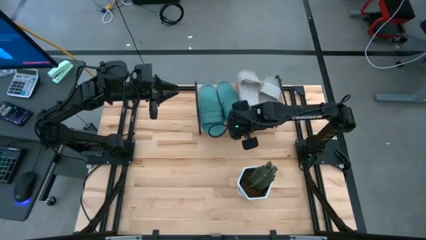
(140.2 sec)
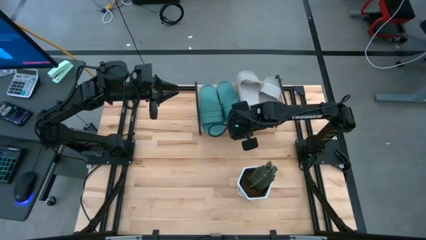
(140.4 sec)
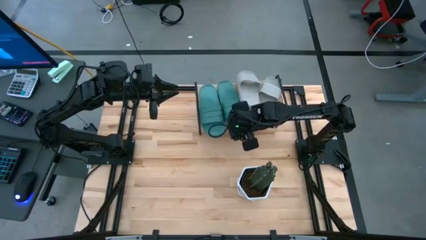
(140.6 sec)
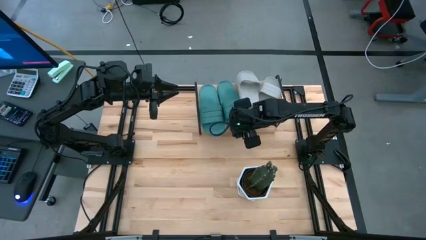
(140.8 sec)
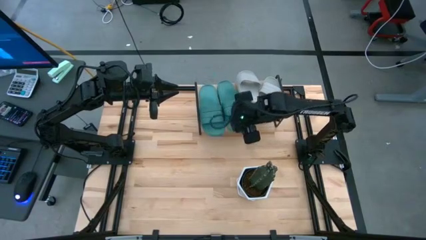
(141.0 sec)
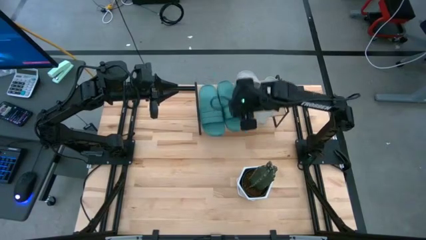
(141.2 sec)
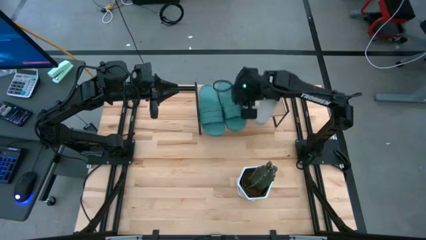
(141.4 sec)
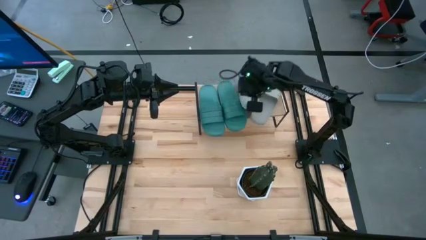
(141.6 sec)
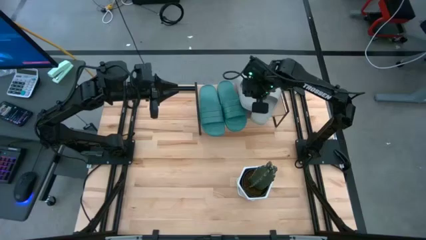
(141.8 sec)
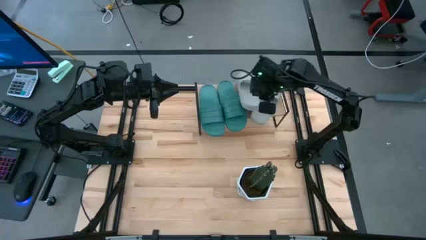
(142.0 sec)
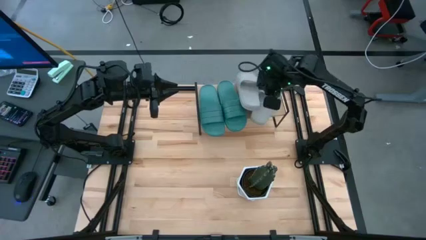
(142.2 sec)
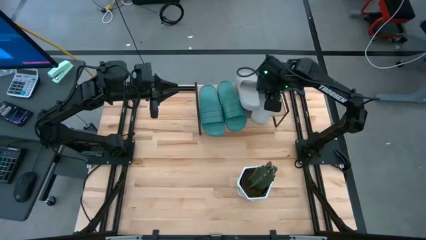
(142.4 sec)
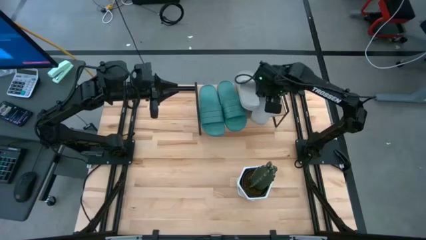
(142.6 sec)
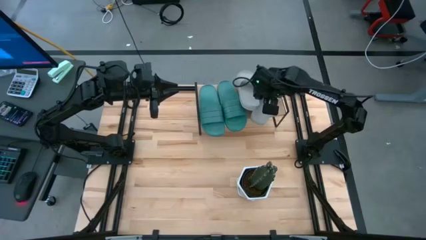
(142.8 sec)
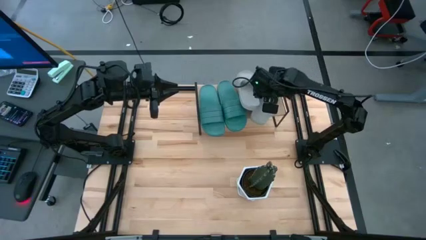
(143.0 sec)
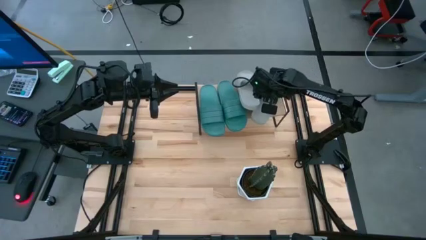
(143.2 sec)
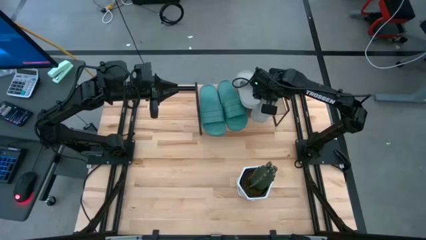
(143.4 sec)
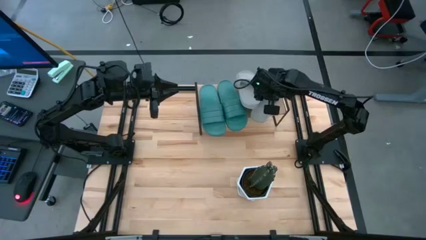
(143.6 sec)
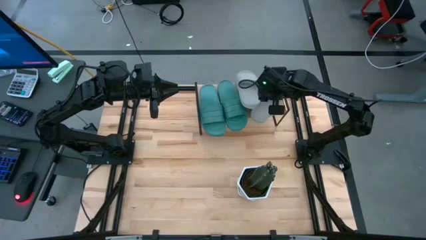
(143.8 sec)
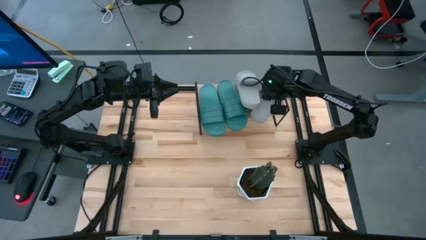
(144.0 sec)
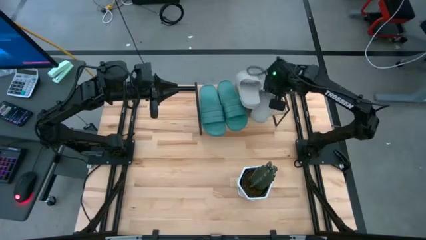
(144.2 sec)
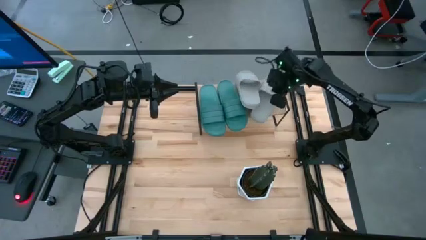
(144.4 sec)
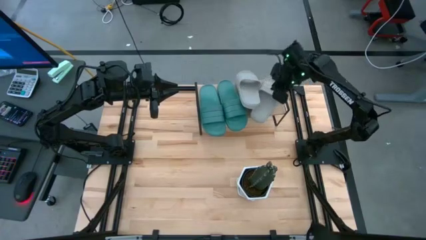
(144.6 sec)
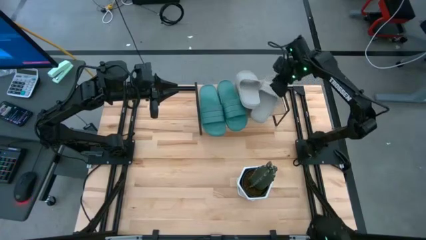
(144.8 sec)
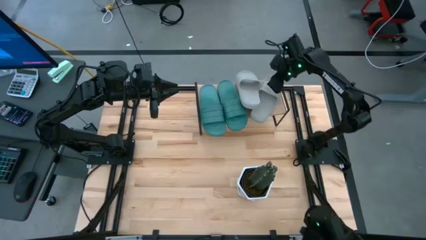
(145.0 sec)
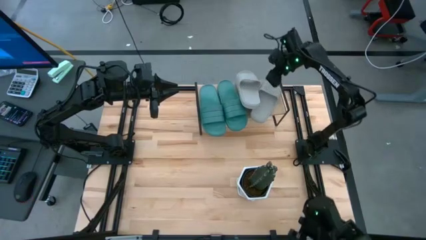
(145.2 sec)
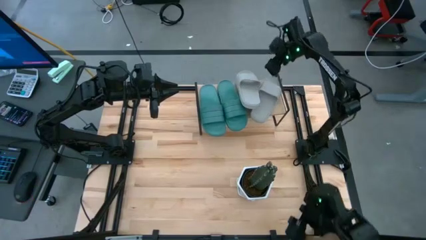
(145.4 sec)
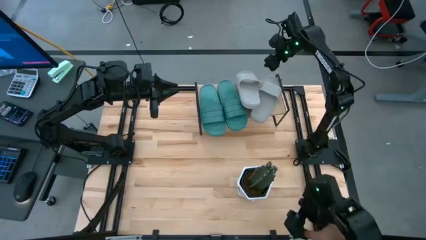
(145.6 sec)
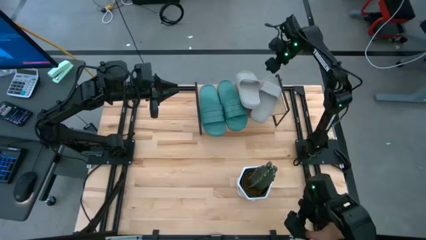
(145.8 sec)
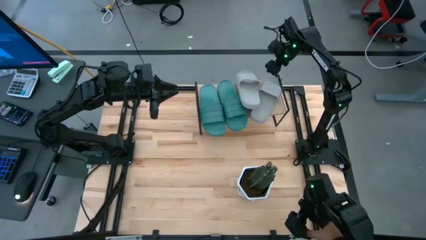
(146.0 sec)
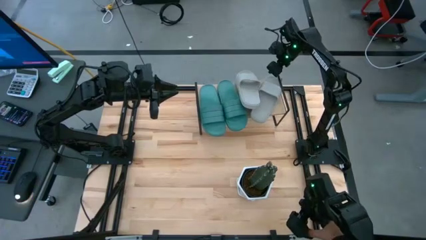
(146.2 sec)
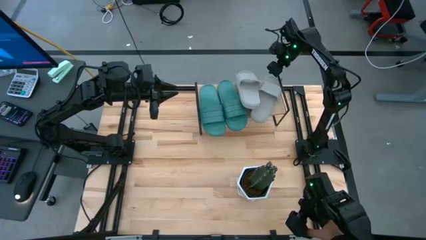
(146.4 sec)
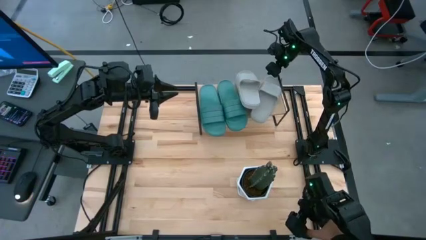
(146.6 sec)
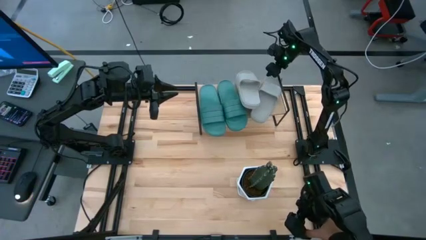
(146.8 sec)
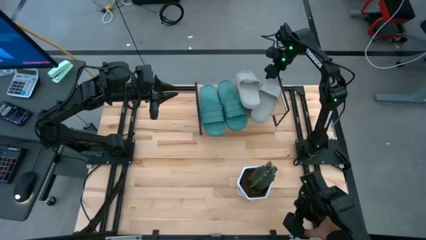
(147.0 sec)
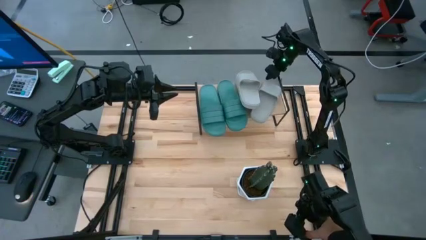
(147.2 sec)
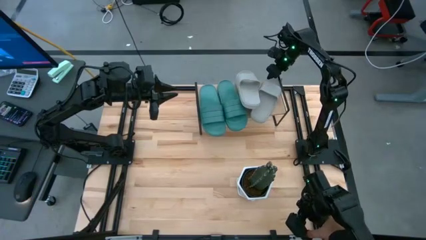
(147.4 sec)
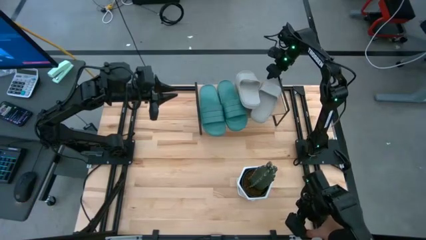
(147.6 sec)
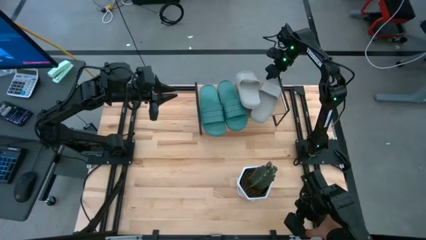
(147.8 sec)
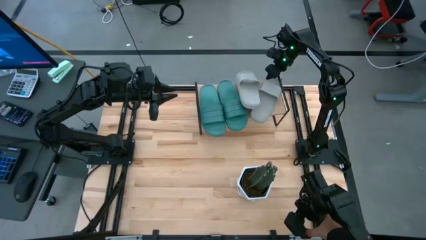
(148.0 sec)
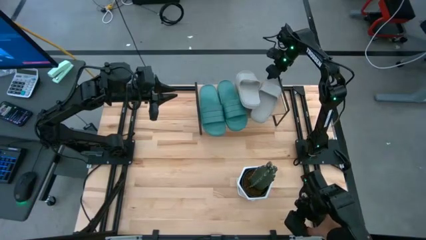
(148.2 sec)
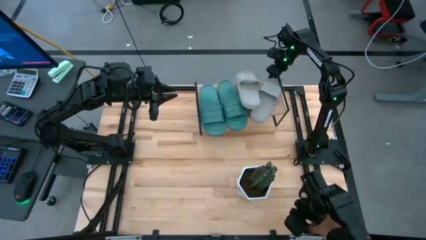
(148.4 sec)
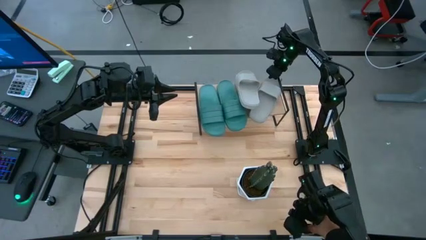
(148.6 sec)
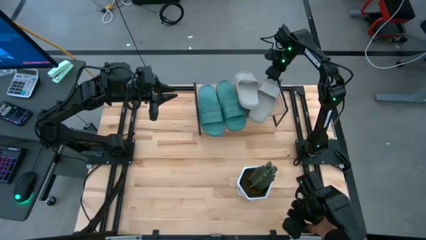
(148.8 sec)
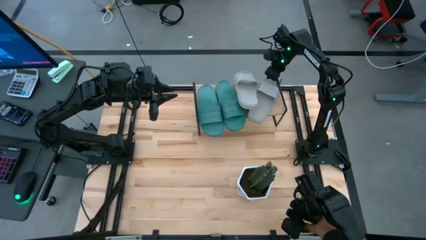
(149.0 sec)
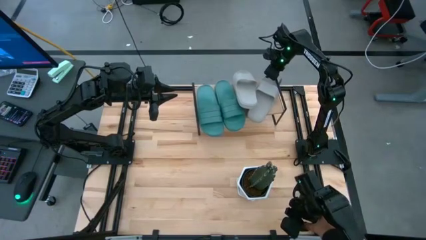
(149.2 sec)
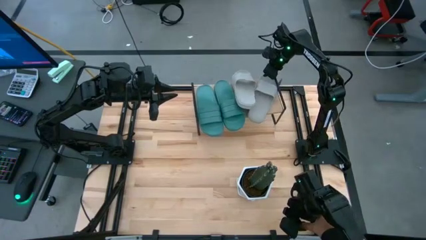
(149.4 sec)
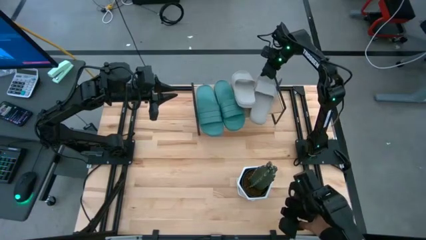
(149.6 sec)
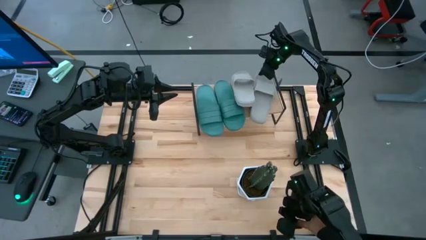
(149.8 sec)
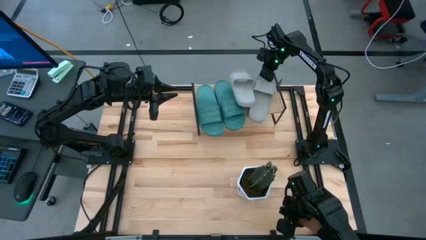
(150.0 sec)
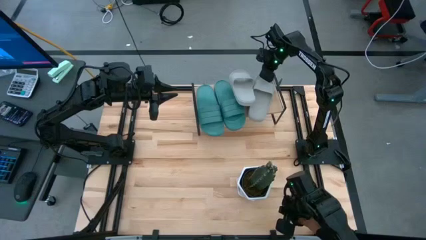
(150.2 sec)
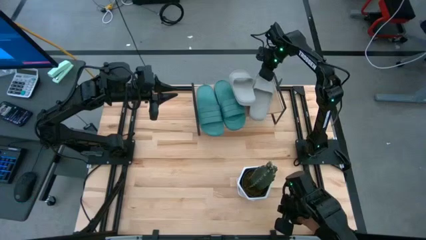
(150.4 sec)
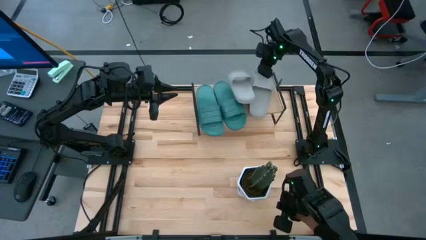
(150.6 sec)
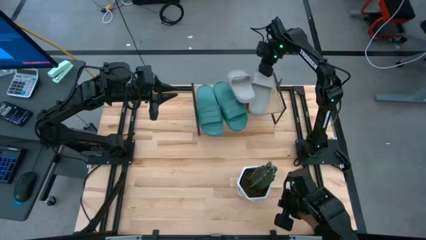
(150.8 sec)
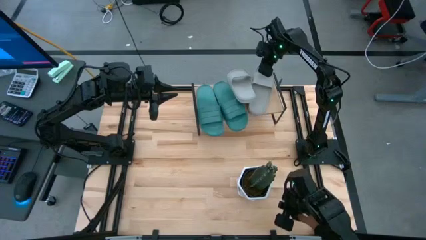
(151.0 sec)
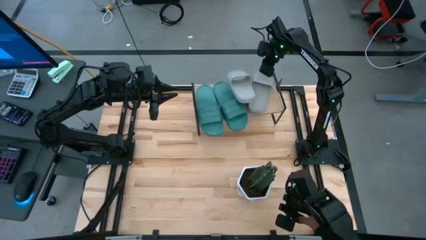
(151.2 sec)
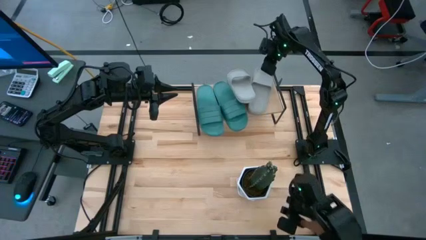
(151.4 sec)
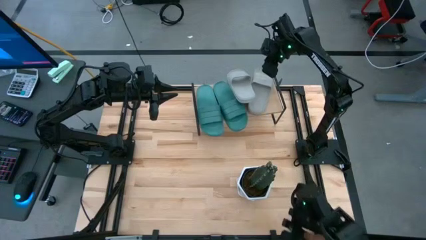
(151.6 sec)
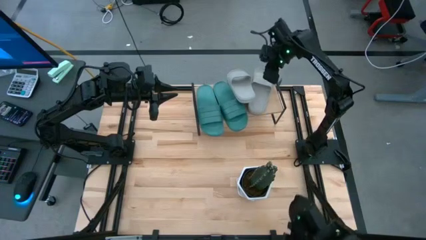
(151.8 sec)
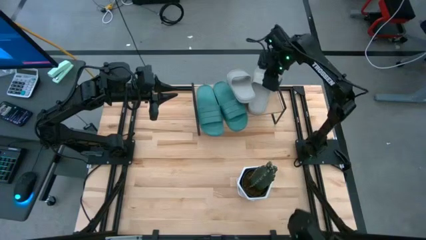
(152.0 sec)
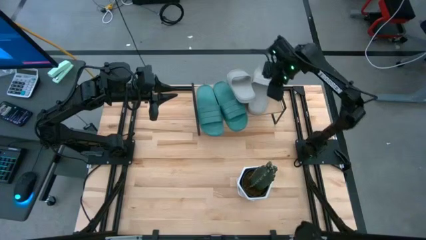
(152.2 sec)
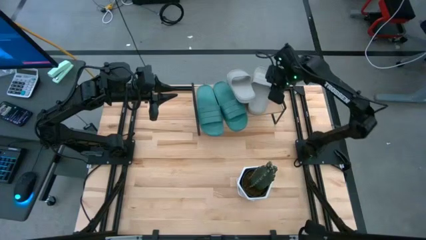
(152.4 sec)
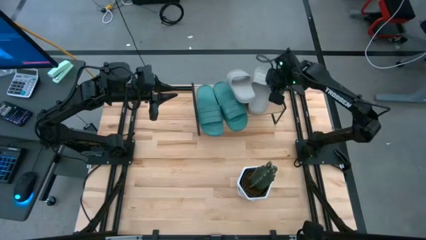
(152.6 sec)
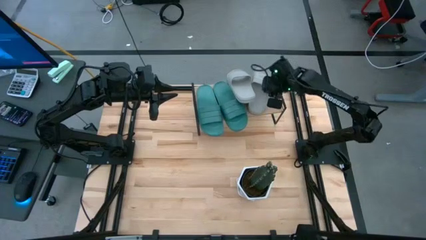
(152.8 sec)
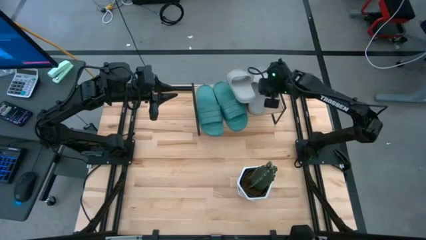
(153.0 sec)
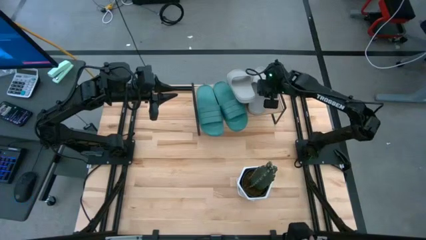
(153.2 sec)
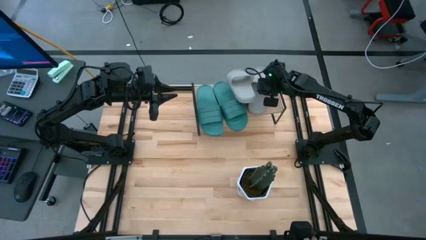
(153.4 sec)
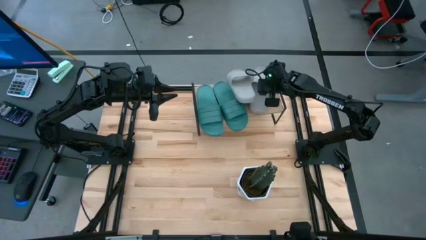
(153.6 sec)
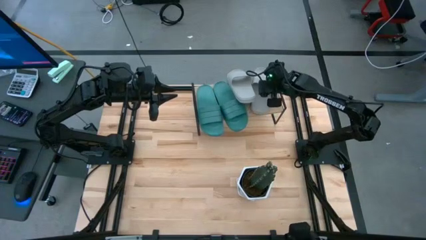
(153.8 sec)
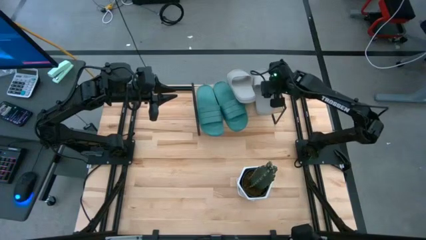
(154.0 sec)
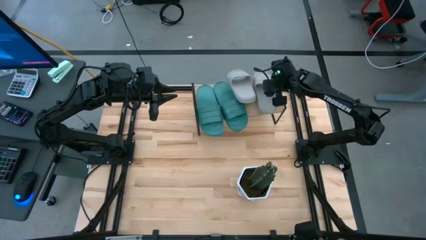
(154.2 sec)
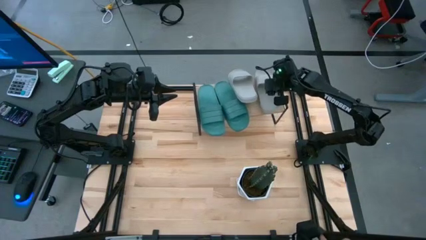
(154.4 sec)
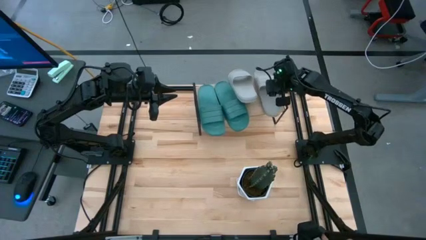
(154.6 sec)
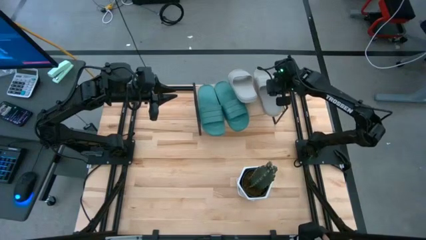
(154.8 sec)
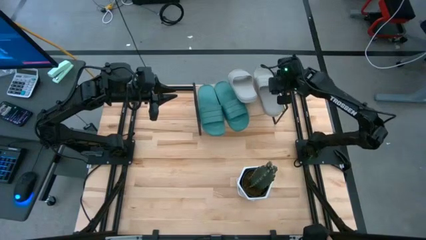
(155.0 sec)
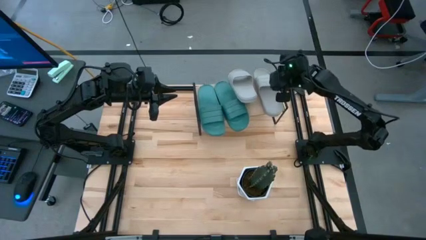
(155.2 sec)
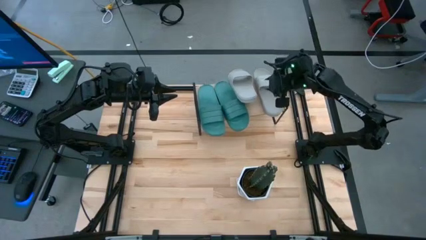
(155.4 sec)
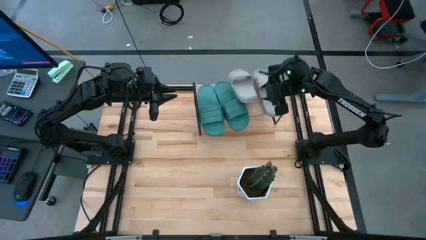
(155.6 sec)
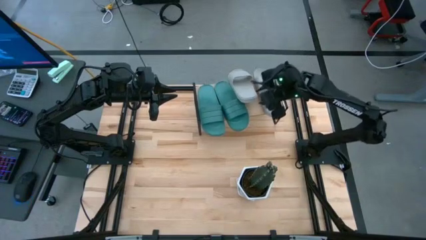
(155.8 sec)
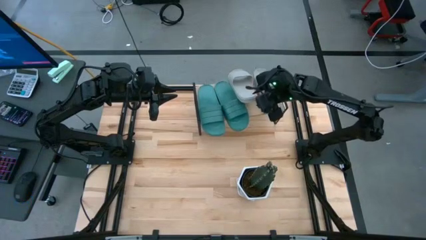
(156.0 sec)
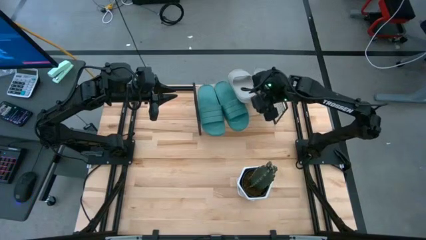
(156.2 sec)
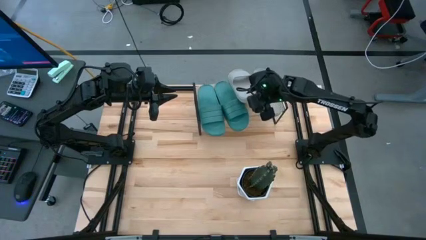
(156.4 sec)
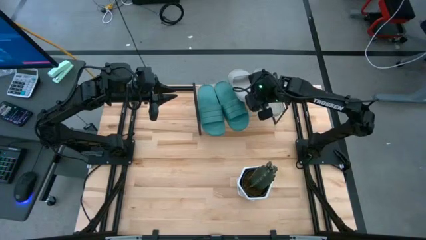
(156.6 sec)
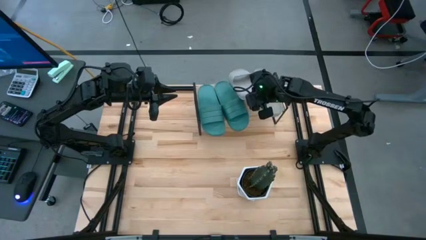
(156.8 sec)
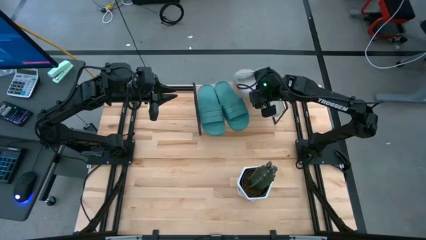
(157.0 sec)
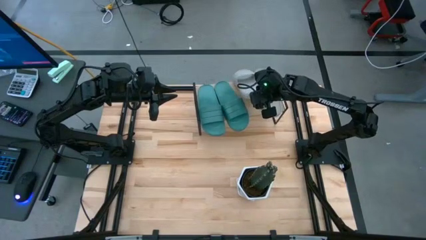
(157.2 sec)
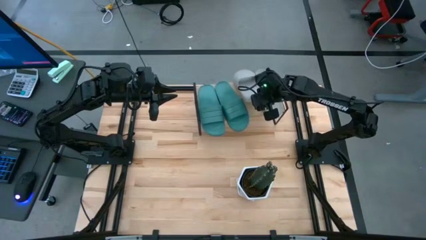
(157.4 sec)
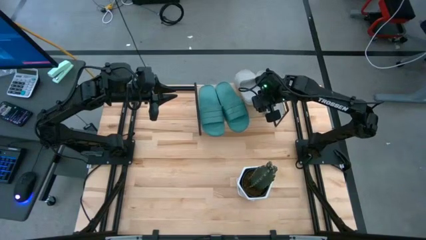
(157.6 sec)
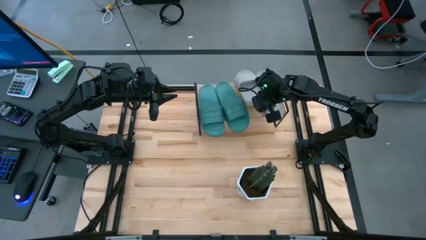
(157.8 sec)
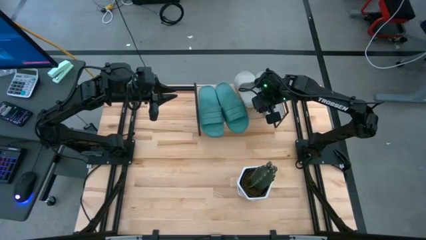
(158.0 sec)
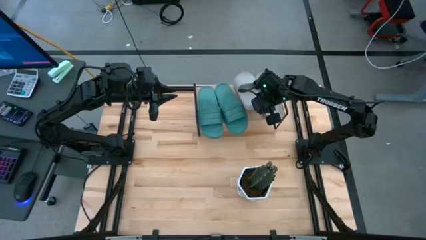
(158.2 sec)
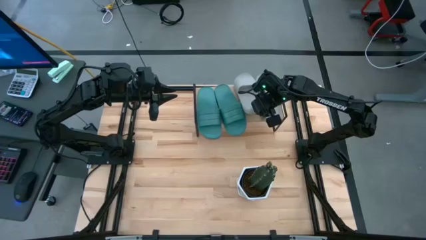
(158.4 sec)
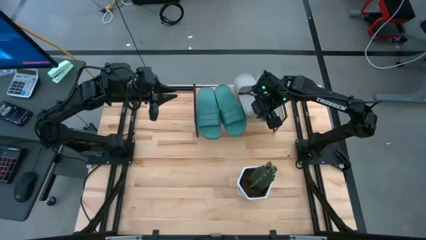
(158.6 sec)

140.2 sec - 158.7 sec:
Task: Pick and place slides into the shelf
Adjust the slippers on the shelf
